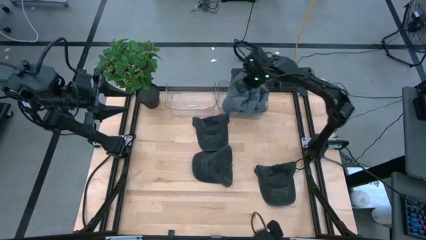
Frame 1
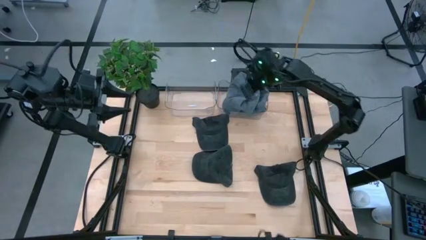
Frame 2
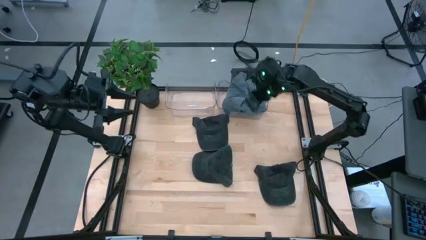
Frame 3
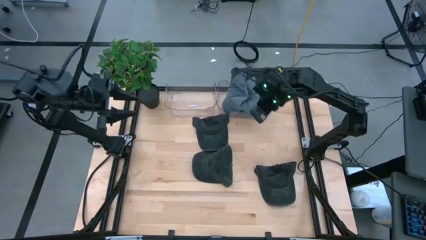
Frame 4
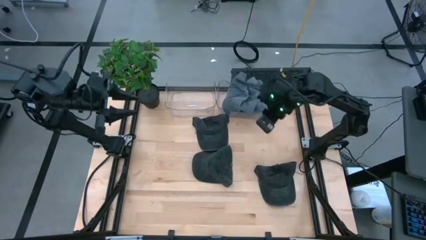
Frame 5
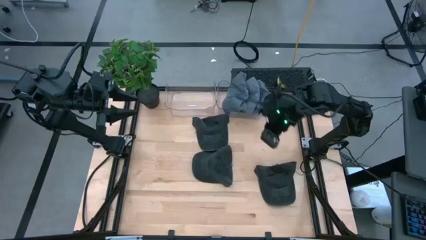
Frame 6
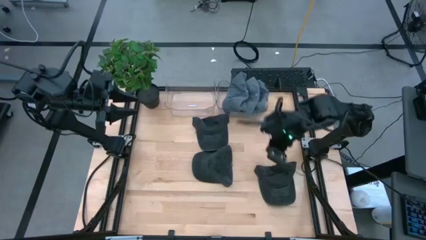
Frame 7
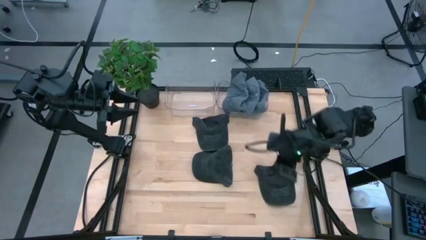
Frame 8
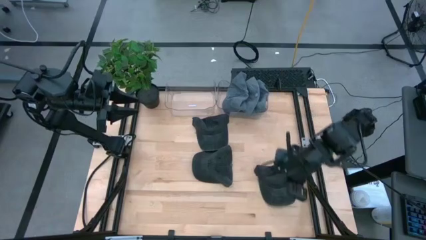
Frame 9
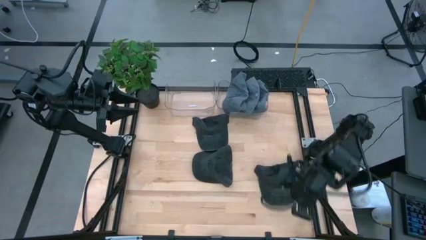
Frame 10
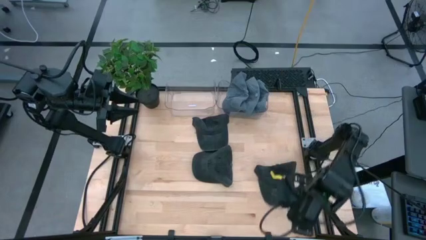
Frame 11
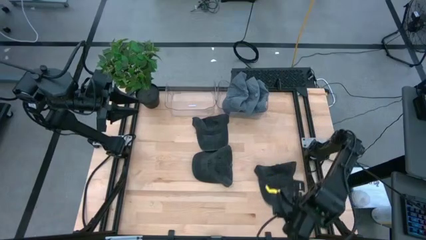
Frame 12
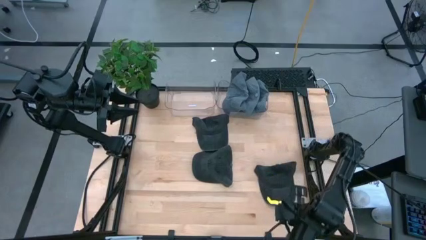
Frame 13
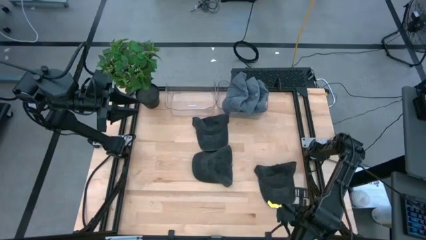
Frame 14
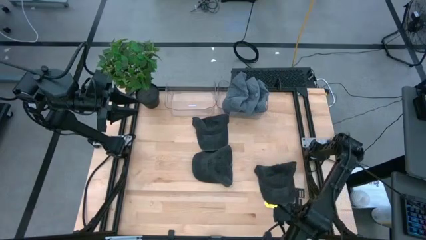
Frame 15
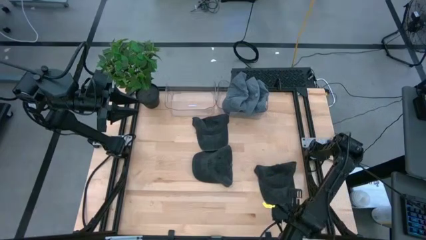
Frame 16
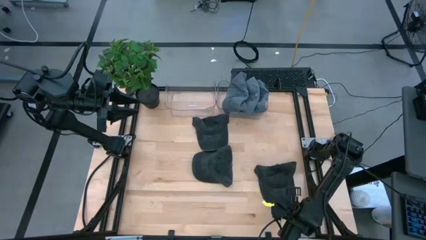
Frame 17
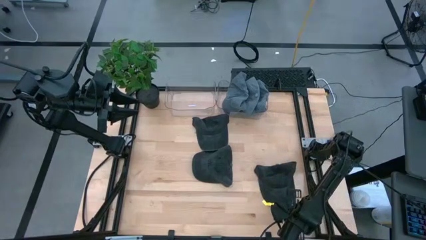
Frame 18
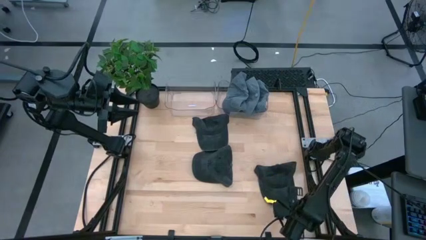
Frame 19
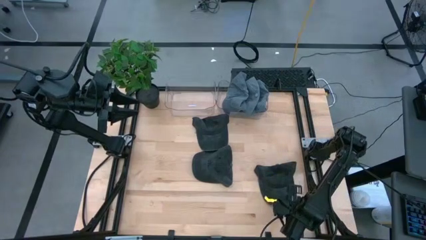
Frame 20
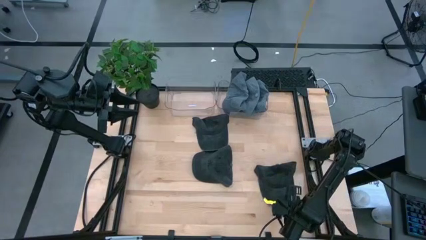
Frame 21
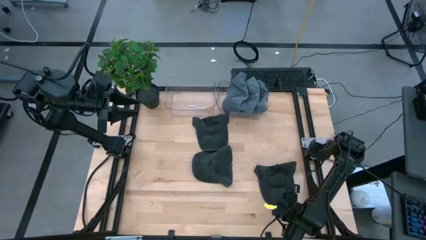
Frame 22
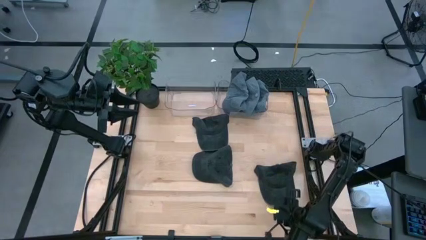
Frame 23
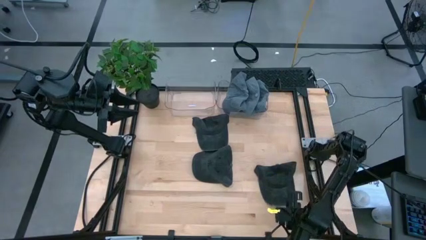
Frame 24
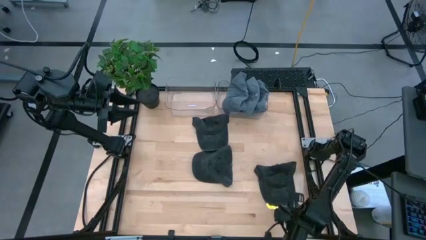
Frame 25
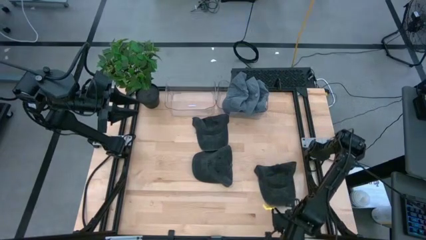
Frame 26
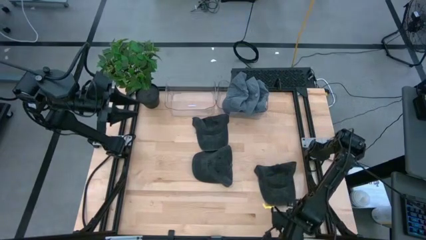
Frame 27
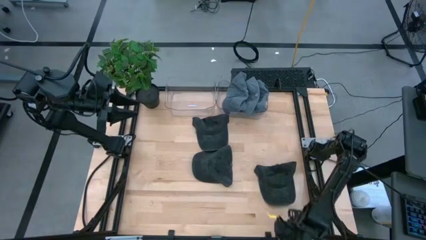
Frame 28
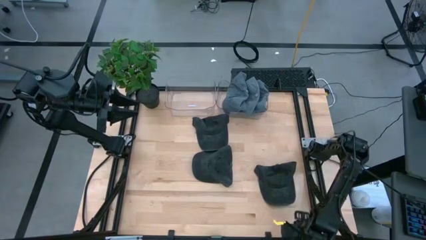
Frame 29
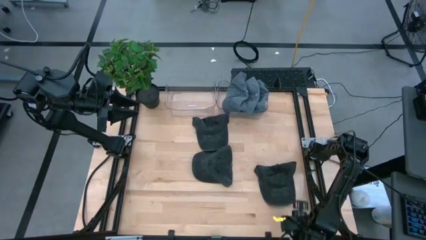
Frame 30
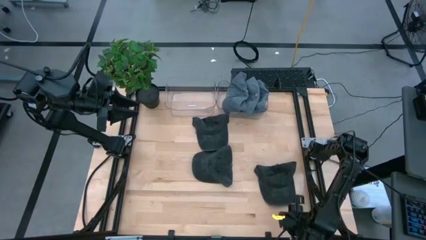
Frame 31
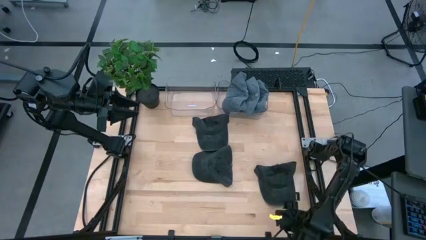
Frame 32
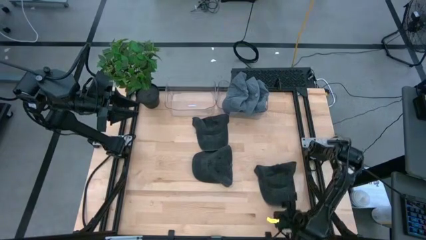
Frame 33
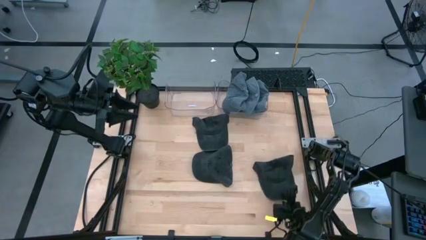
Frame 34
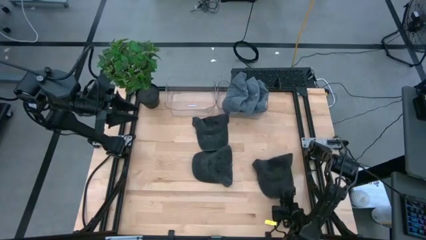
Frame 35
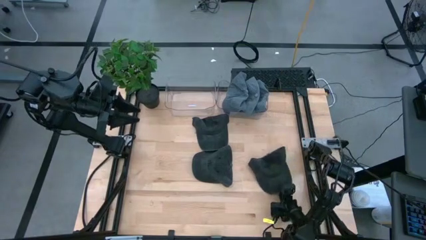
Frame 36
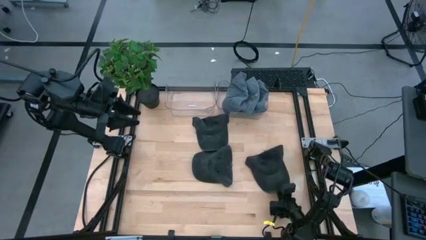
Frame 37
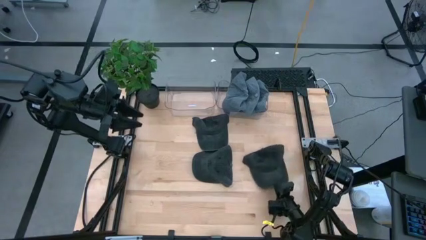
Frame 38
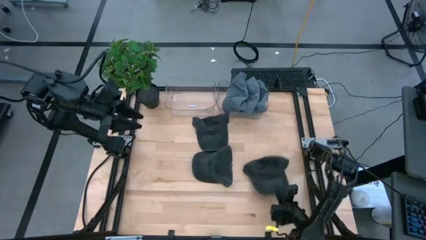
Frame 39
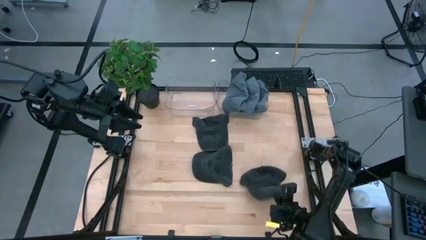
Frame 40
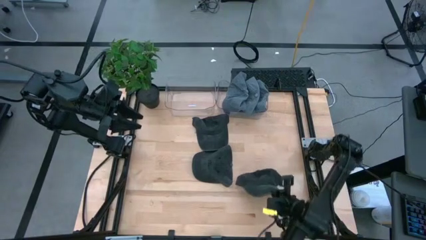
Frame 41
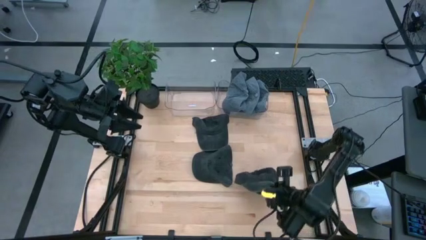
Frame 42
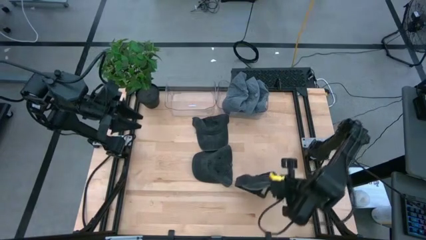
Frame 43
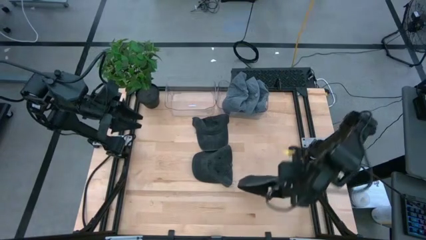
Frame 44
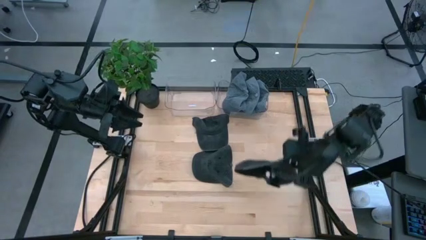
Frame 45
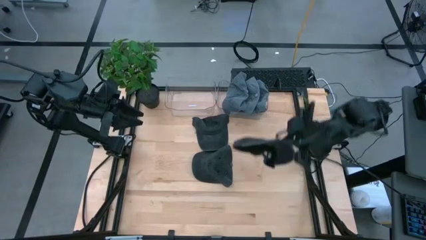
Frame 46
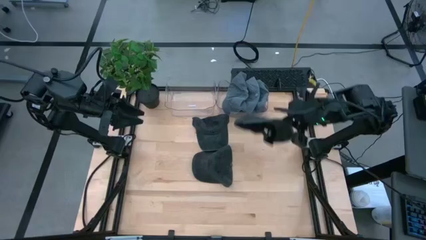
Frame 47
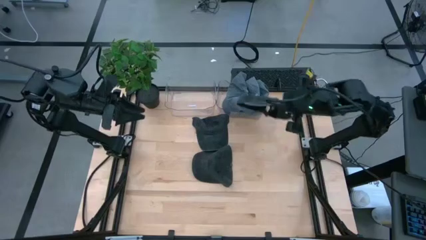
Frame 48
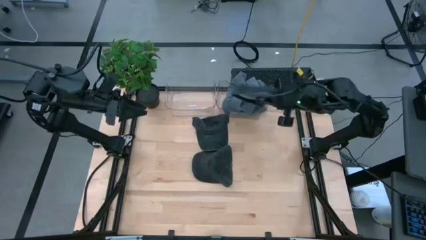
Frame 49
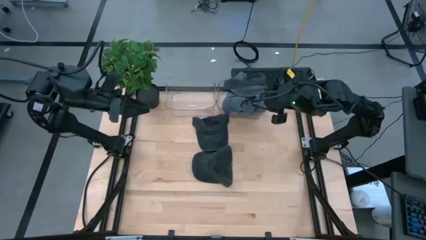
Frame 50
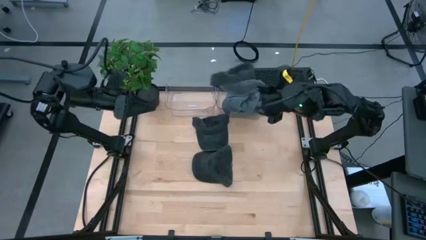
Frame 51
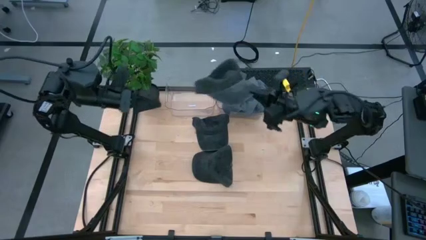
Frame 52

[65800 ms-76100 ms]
Task: Pick & Place hat
Put the bottom right black cap into the left transparent bin
